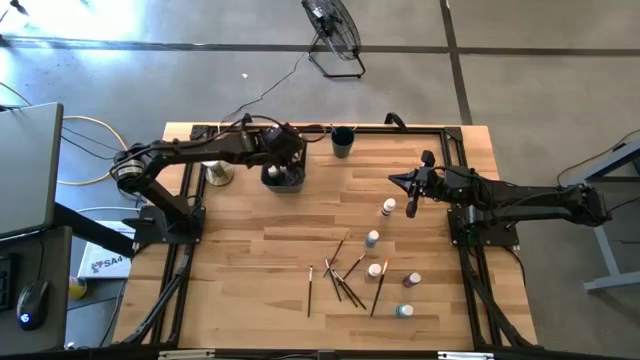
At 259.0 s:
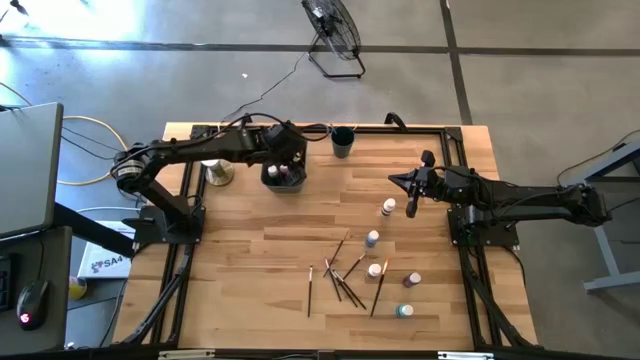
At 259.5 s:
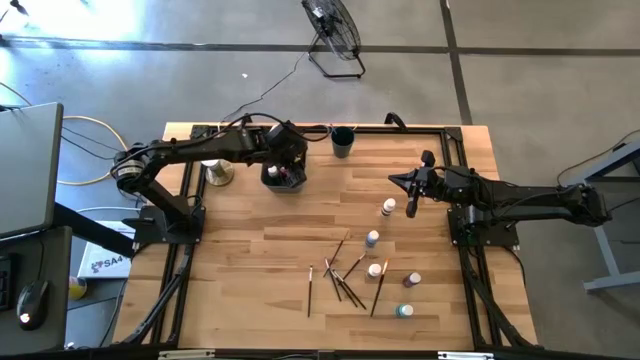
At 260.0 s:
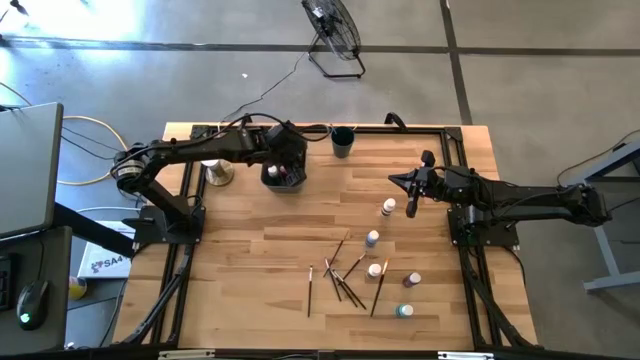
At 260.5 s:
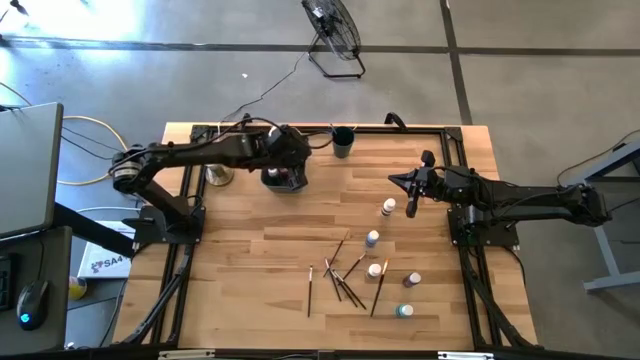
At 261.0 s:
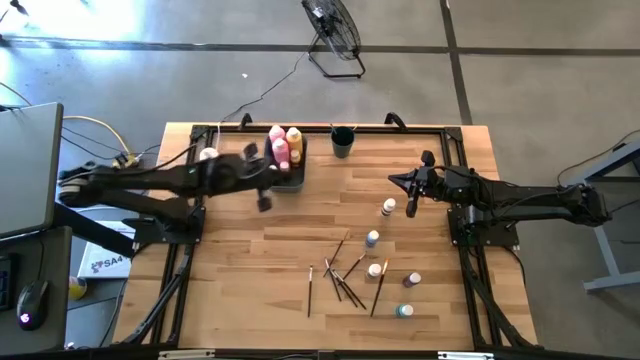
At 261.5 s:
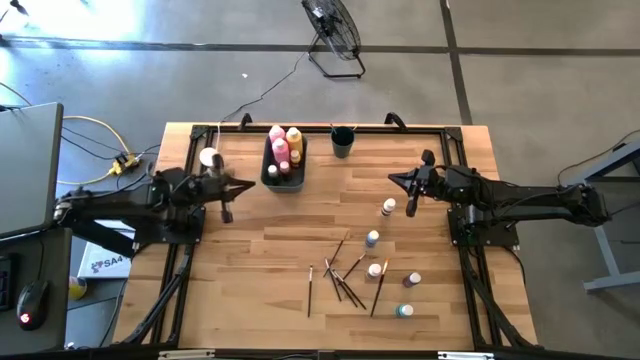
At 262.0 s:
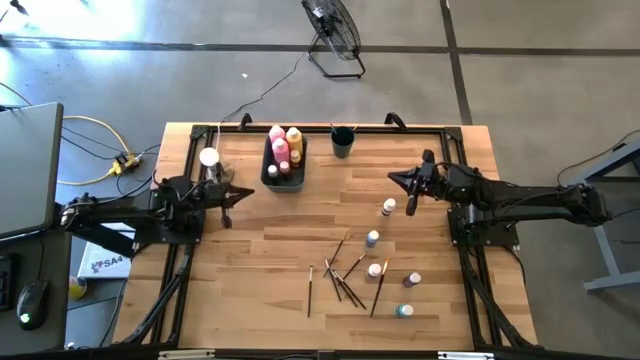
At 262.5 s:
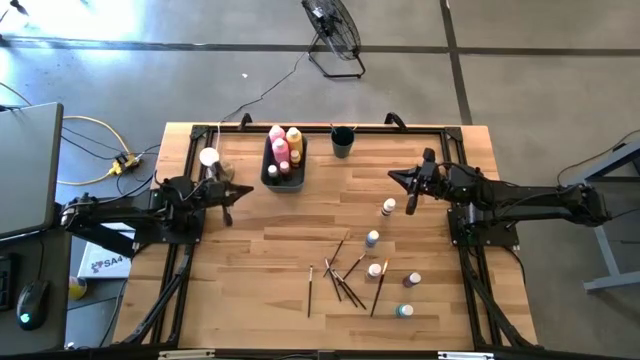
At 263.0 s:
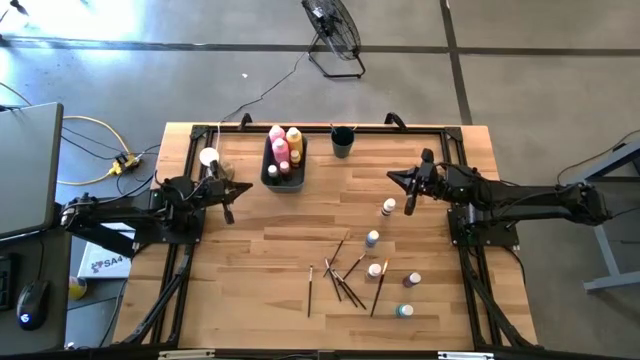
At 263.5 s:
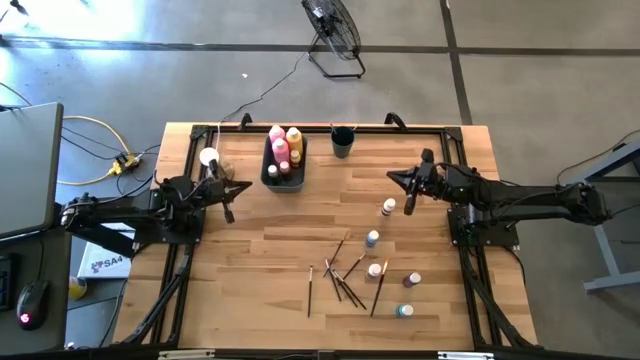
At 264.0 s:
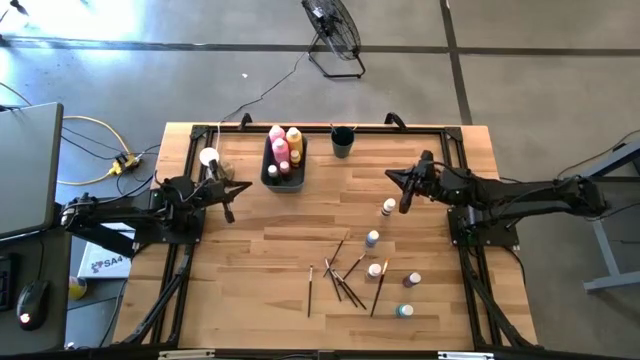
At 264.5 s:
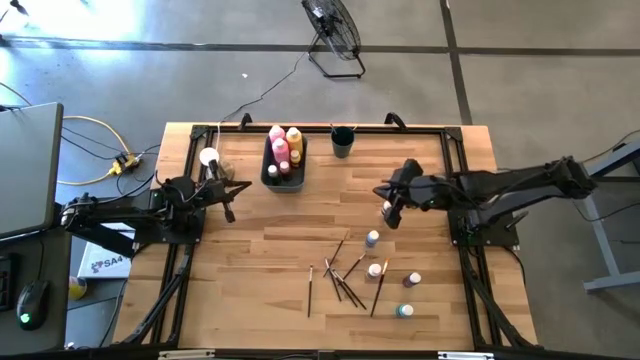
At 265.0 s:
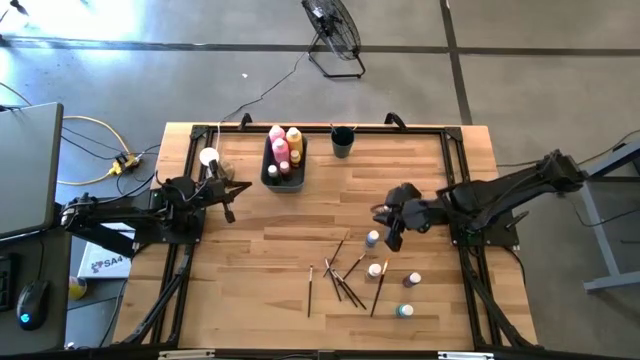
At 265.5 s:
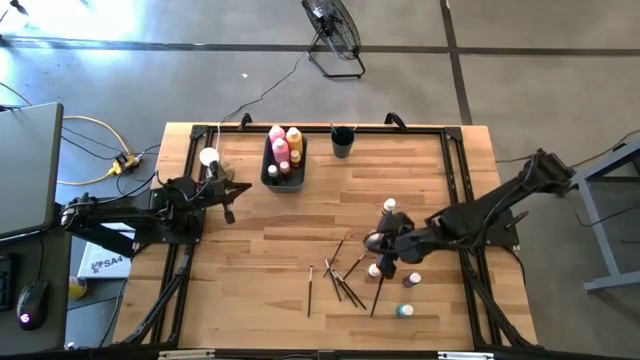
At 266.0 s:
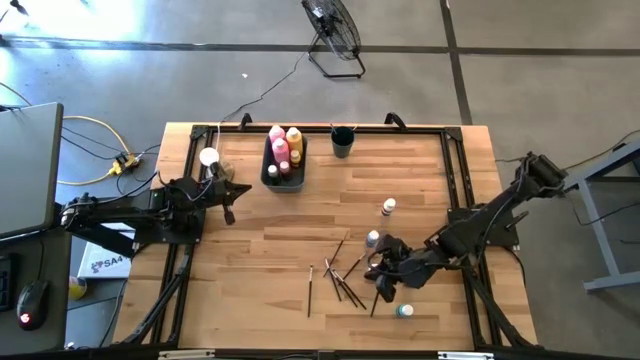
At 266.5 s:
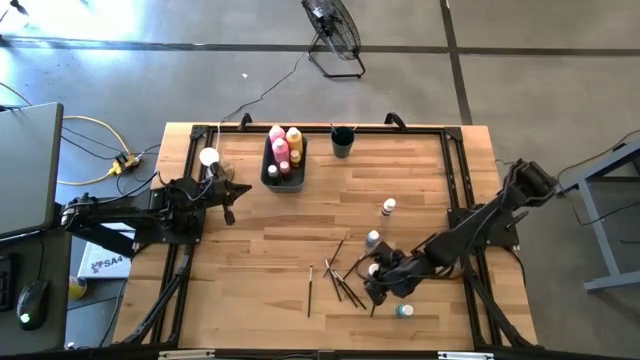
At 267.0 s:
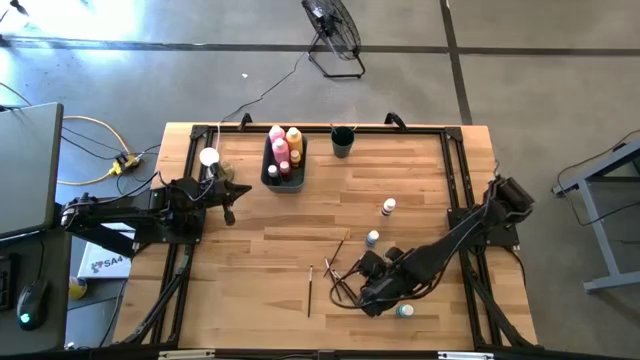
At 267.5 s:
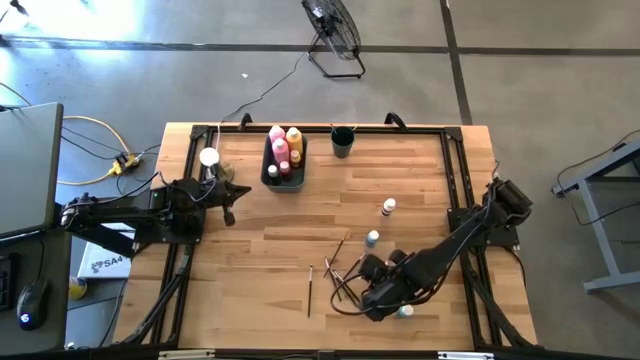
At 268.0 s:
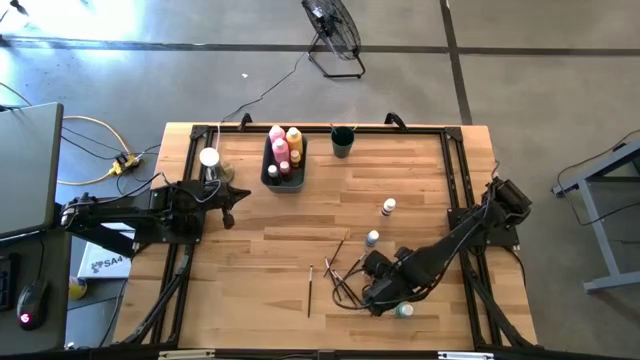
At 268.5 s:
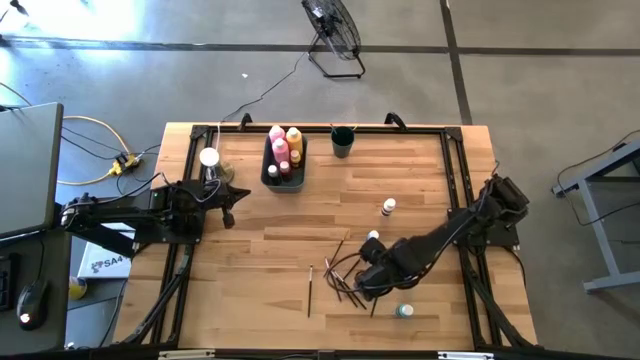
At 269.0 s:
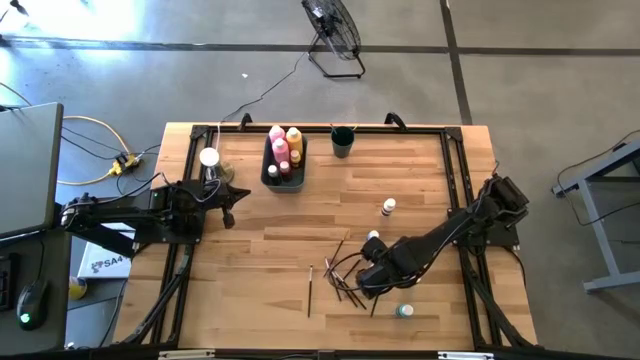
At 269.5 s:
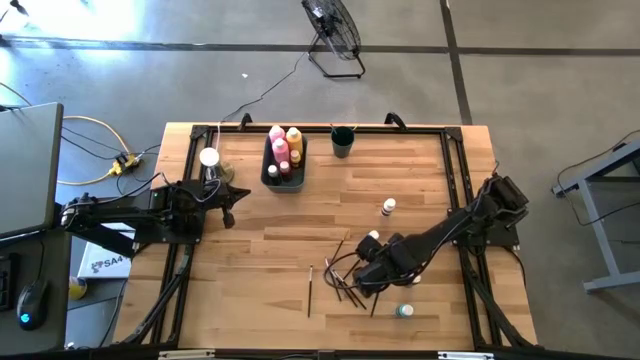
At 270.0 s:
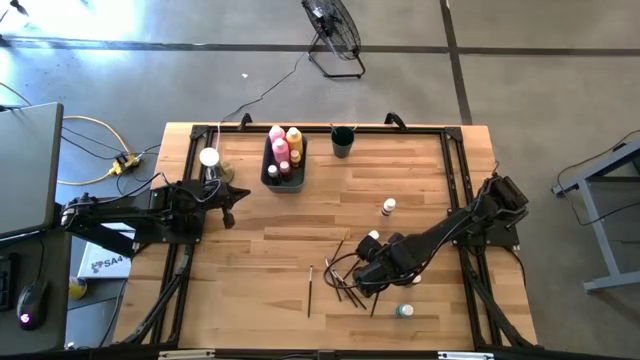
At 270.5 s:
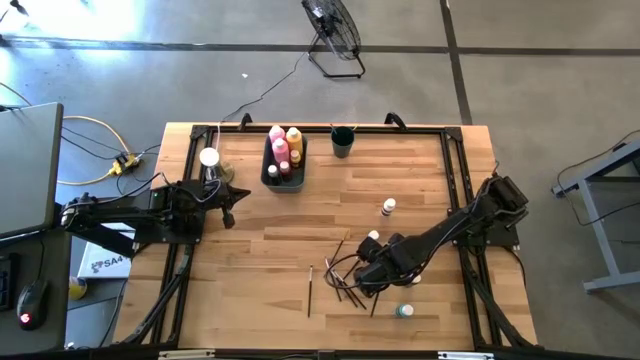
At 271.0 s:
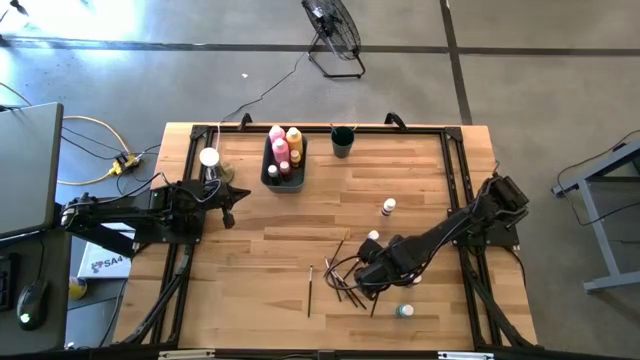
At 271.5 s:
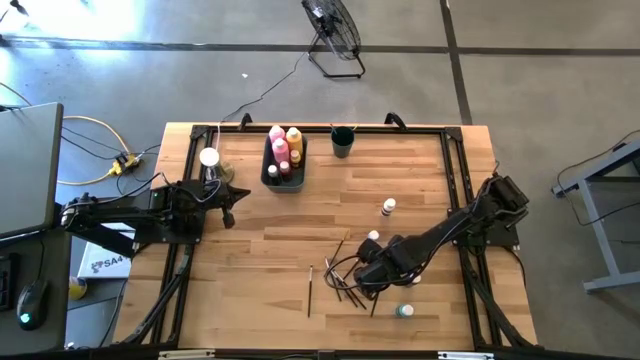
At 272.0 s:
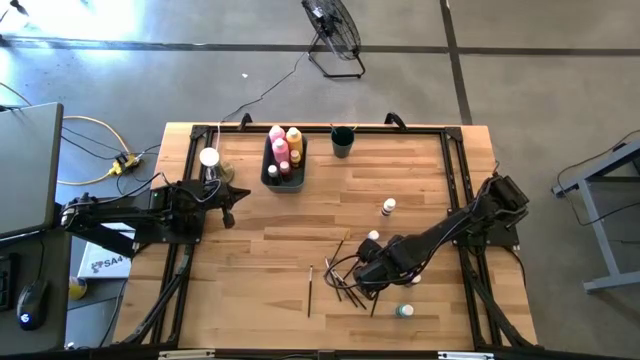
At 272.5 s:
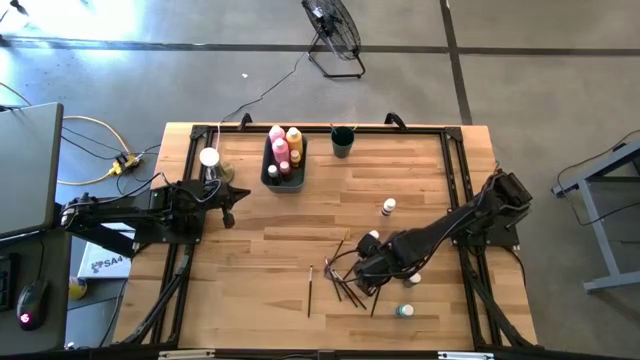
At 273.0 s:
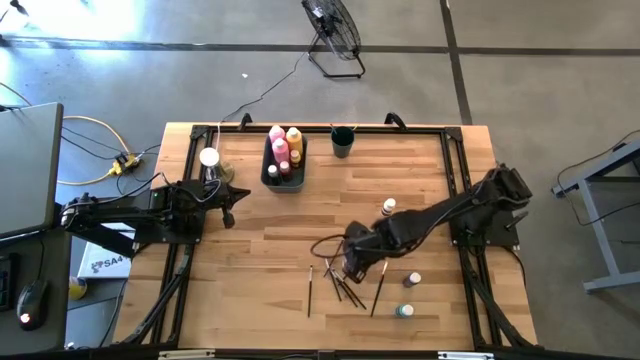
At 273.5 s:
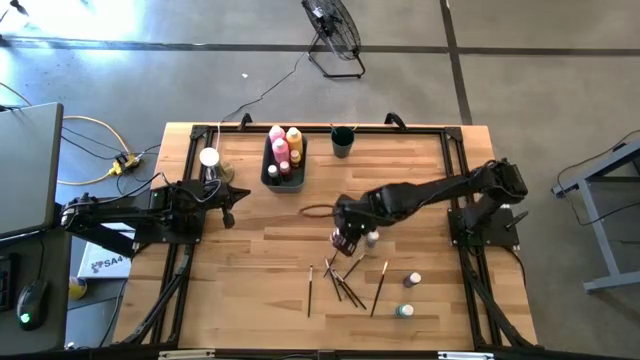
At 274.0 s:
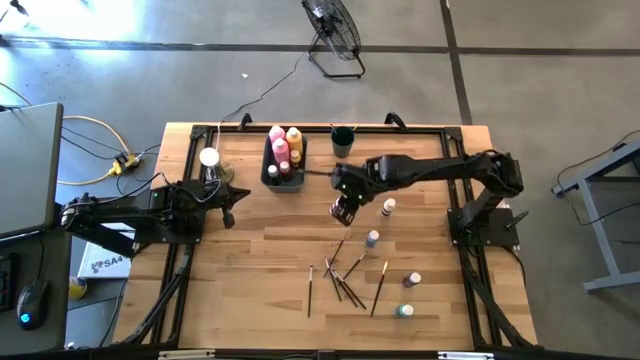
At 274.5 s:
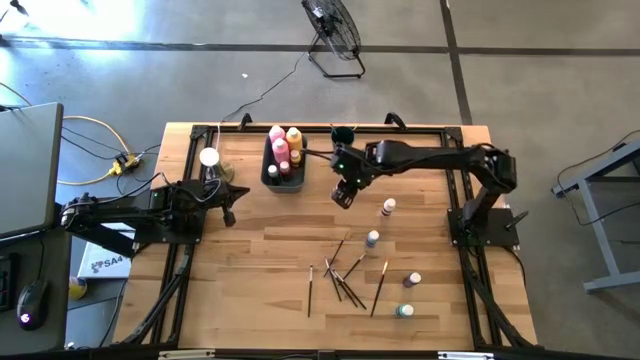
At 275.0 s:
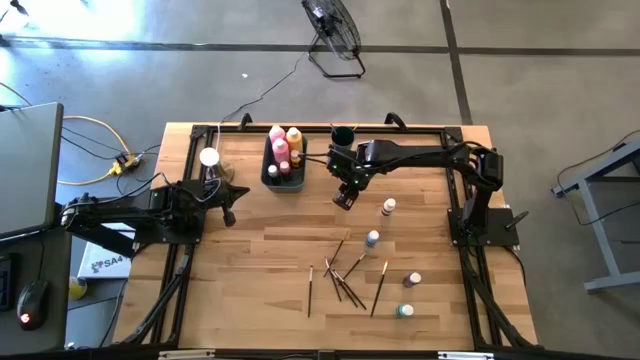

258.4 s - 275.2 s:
Task: Pick & Place Paint Supplies
Adjust the paint bottles
